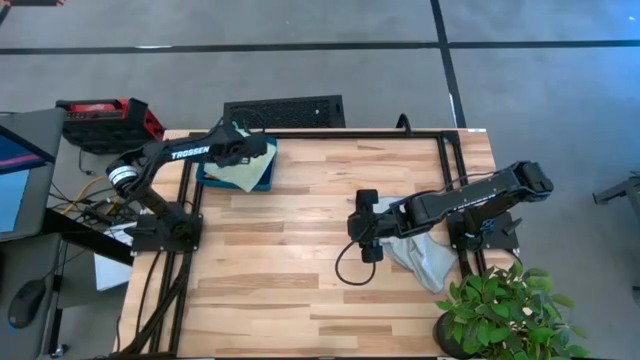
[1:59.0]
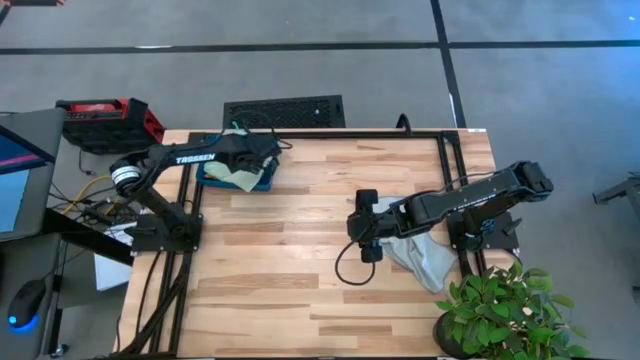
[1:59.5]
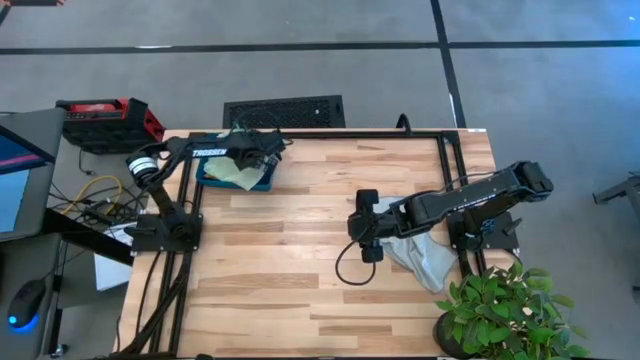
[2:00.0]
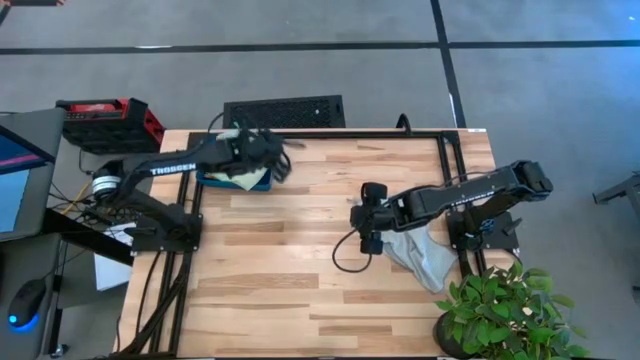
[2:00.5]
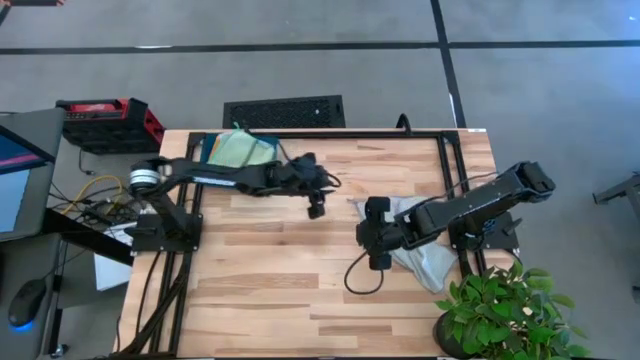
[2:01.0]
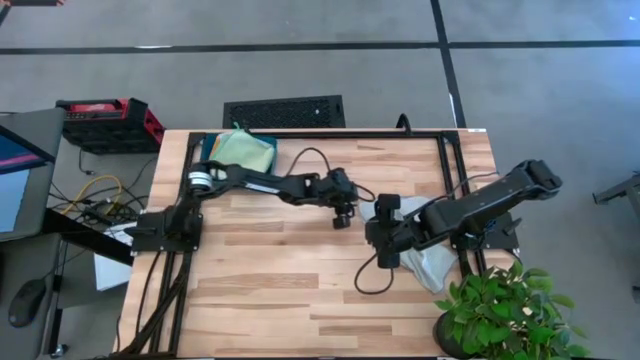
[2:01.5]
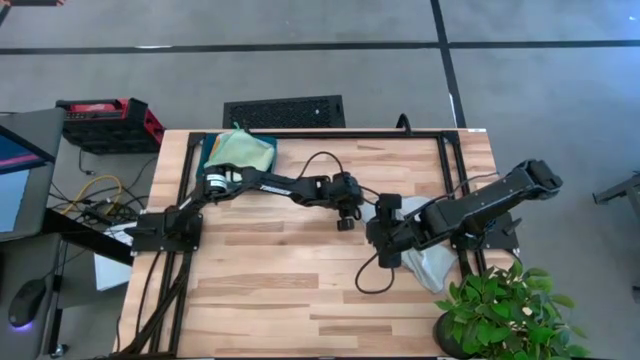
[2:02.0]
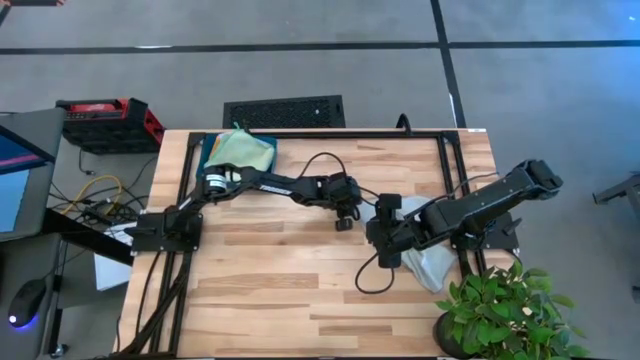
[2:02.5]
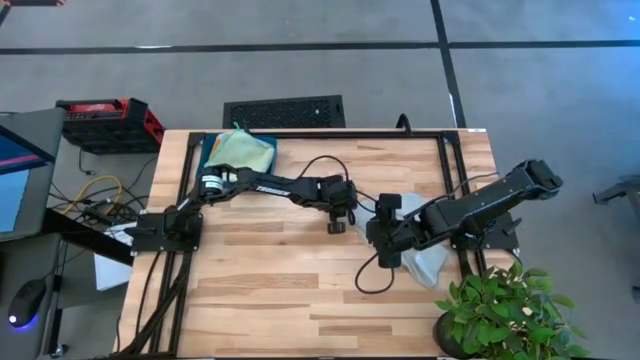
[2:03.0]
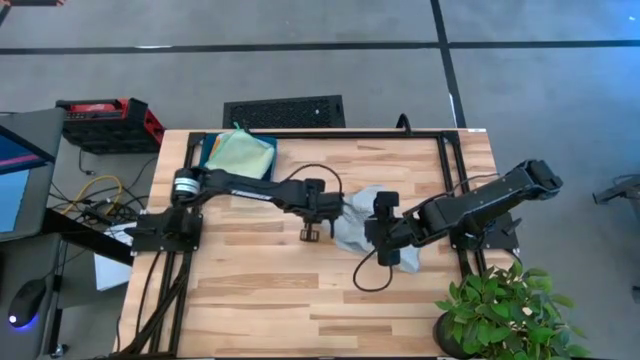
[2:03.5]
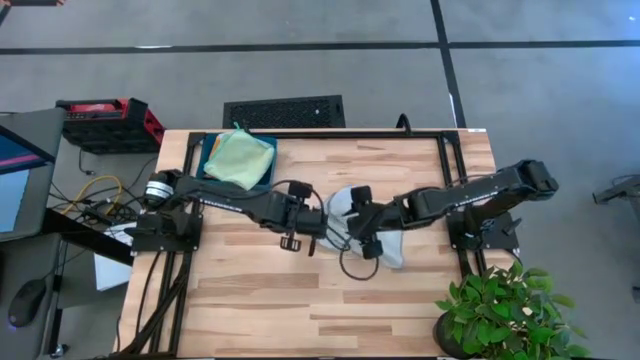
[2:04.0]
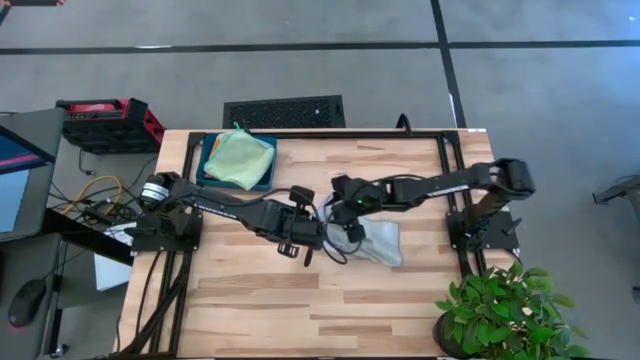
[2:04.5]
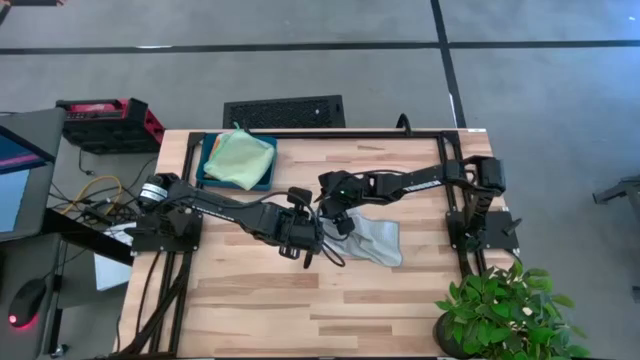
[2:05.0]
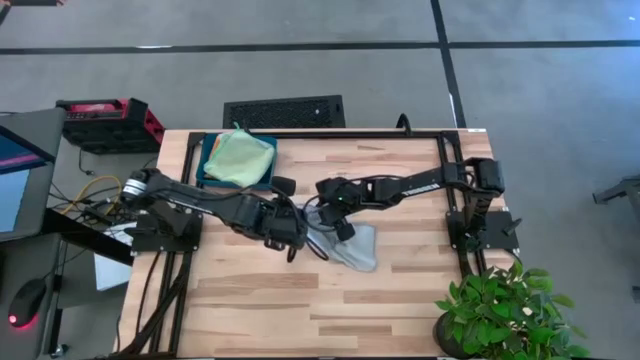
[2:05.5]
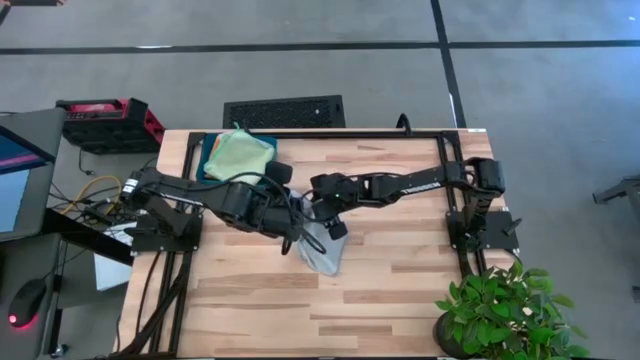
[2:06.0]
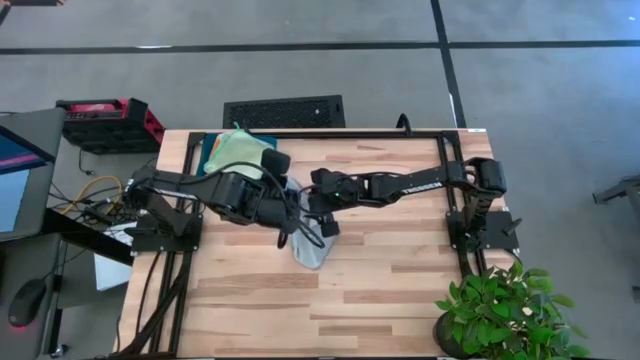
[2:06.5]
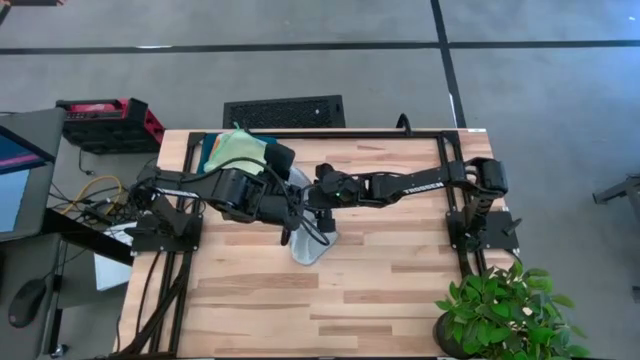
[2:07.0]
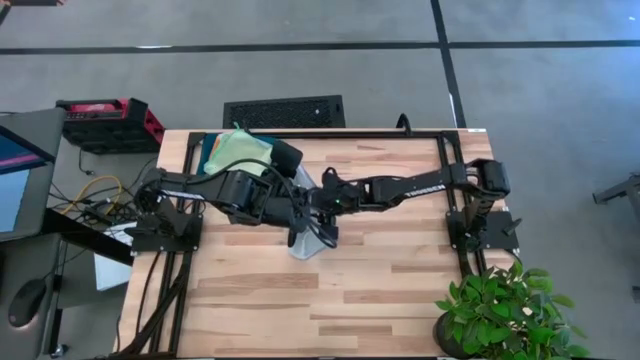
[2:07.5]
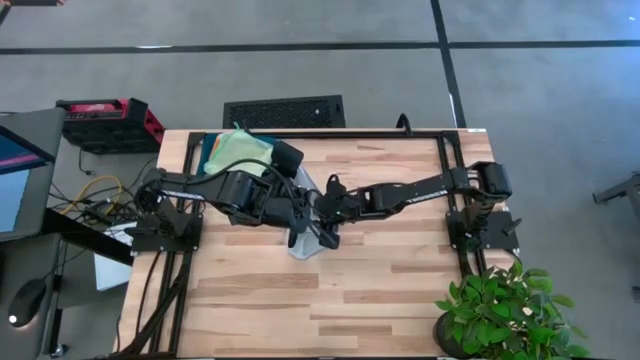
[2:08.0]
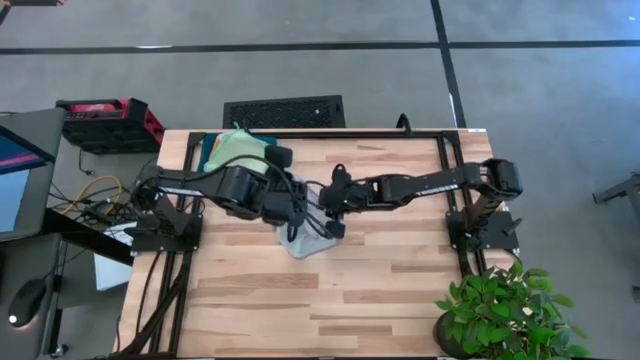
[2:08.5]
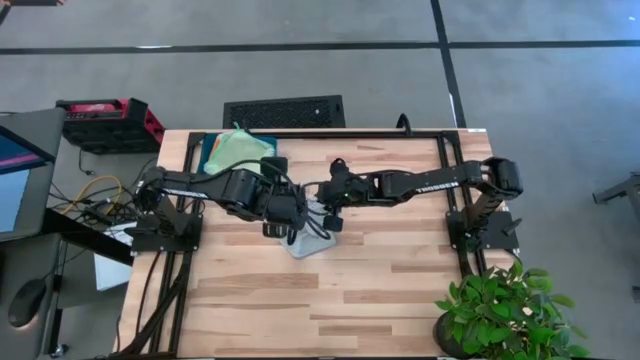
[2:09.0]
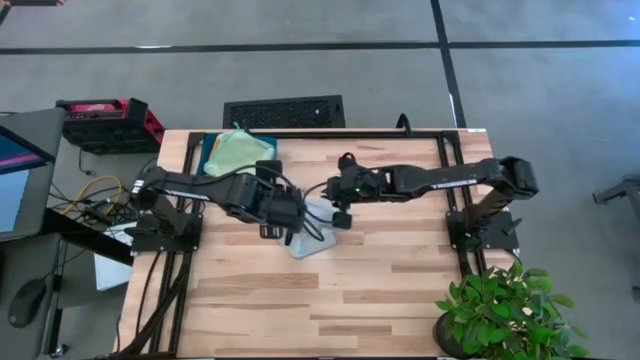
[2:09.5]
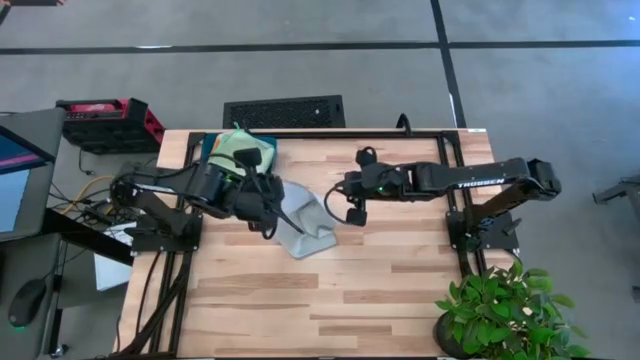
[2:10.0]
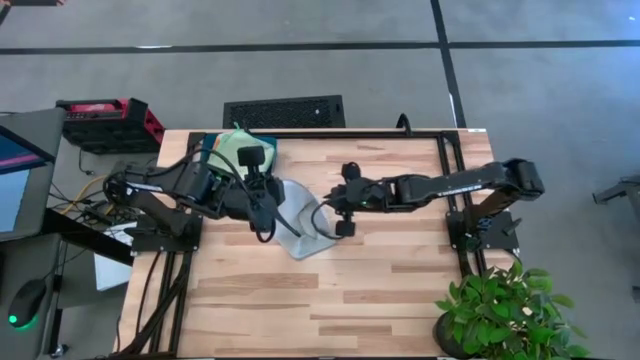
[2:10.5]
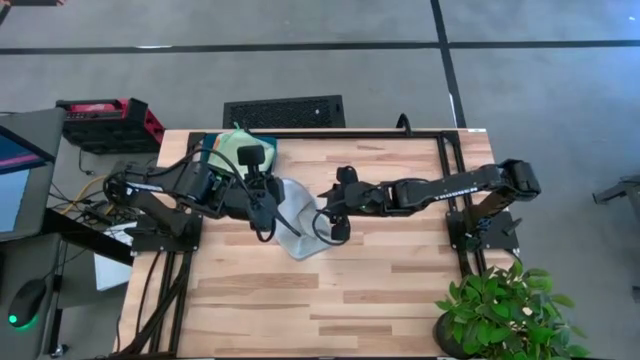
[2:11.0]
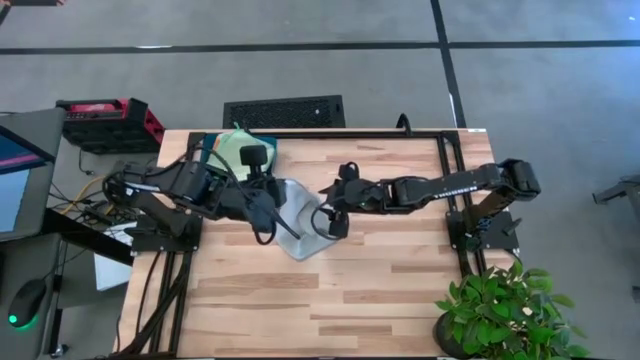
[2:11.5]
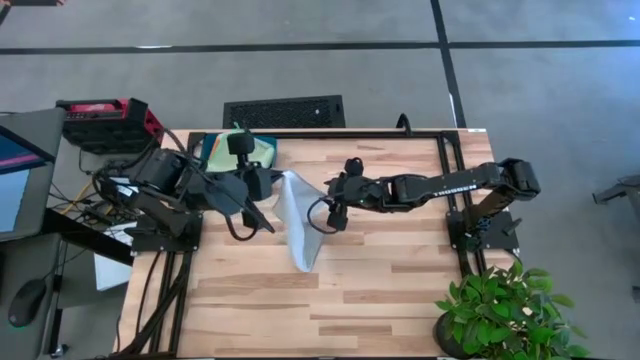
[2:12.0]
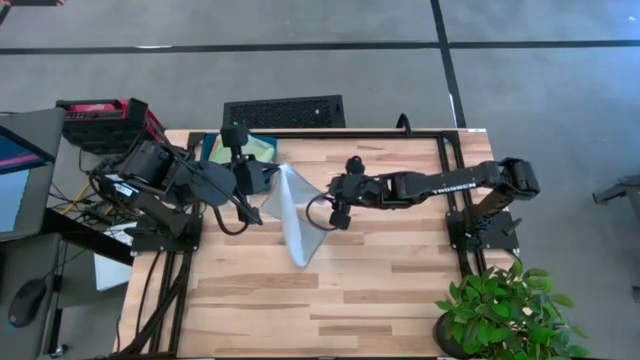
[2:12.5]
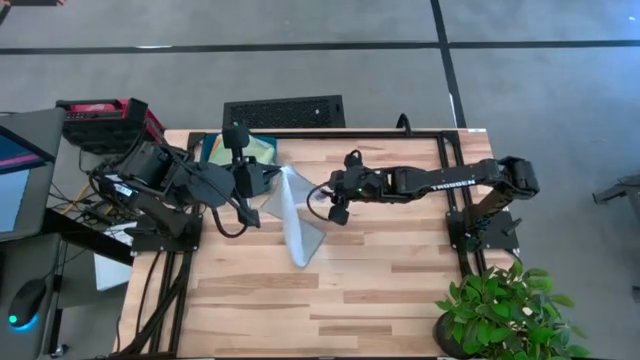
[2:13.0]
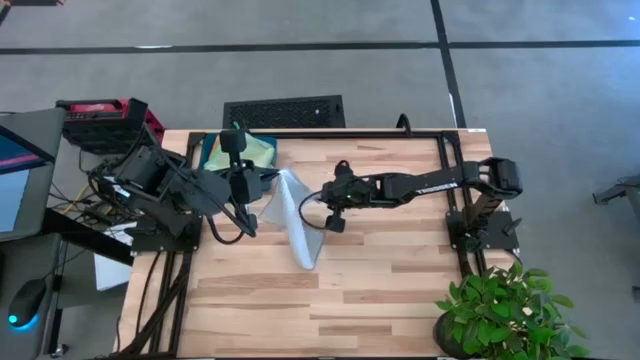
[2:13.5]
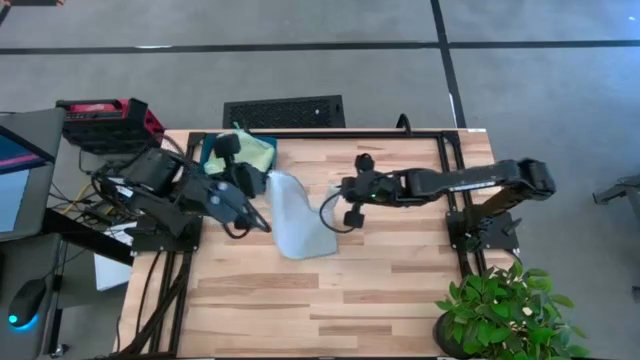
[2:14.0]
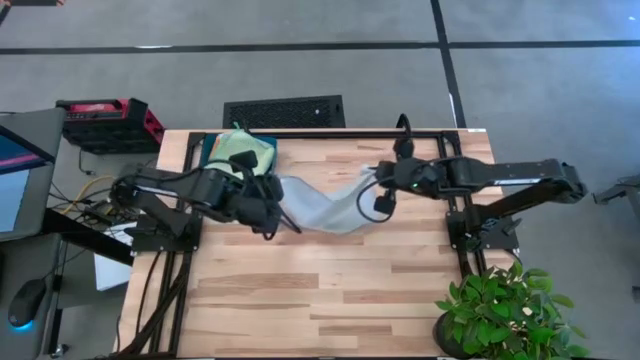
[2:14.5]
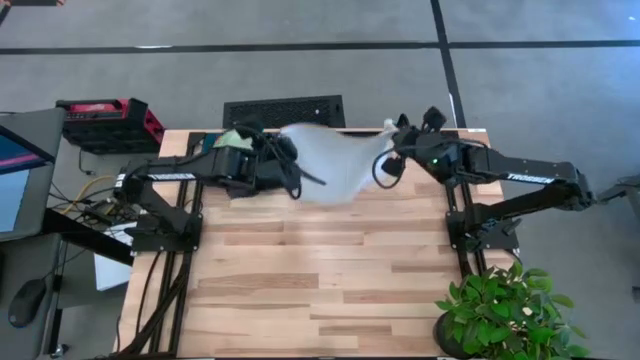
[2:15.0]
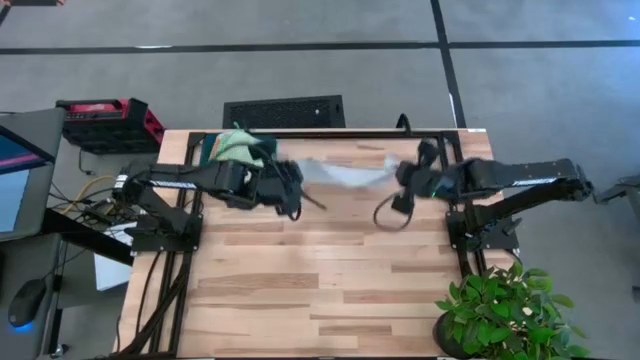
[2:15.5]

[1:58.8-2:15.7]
Task: Fold microfiber towels
Fold the gray towel

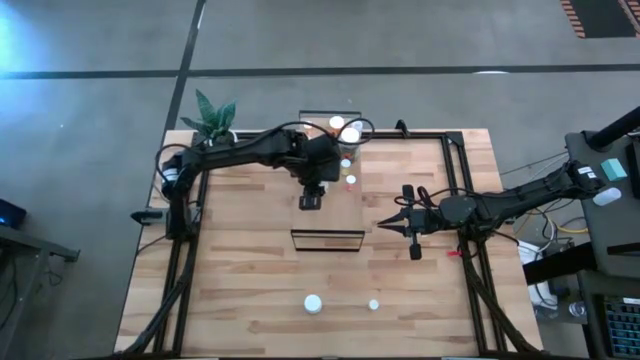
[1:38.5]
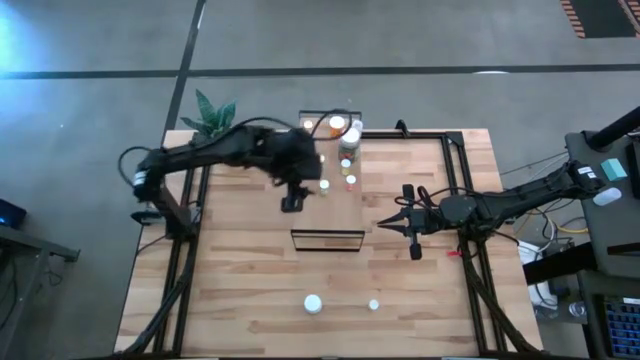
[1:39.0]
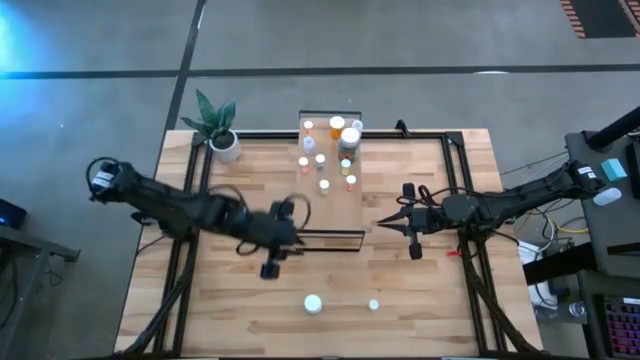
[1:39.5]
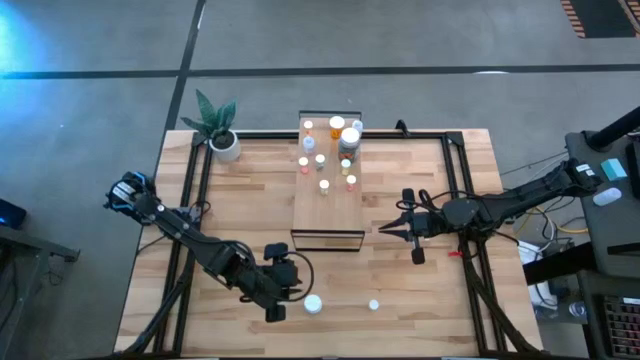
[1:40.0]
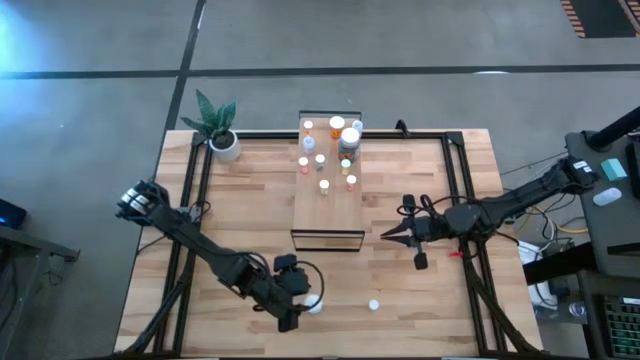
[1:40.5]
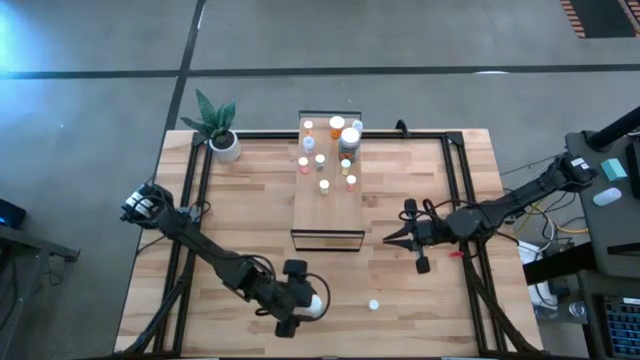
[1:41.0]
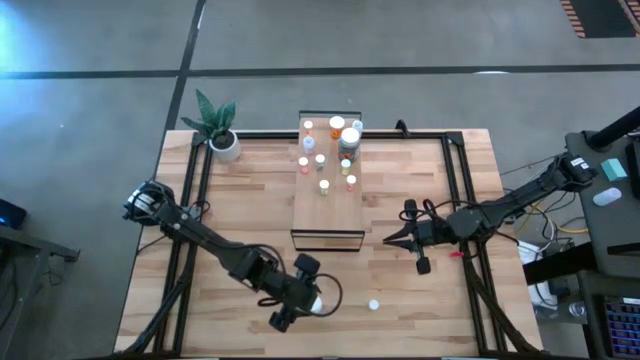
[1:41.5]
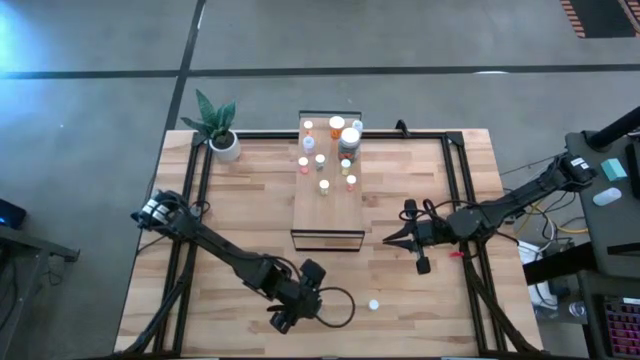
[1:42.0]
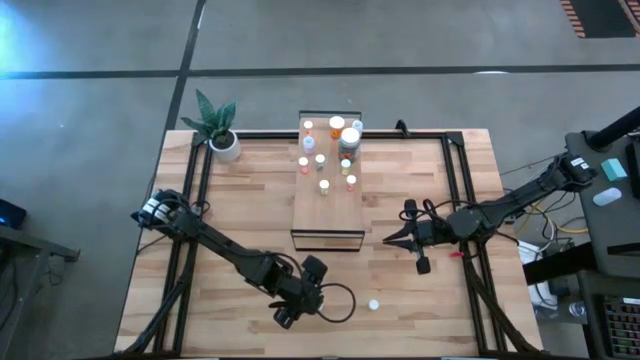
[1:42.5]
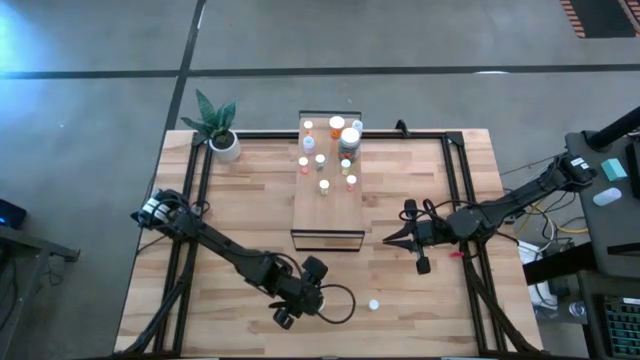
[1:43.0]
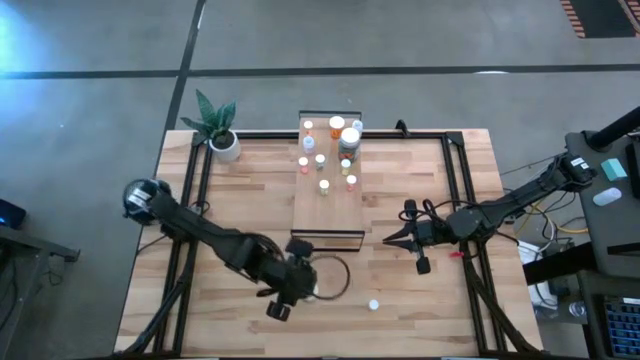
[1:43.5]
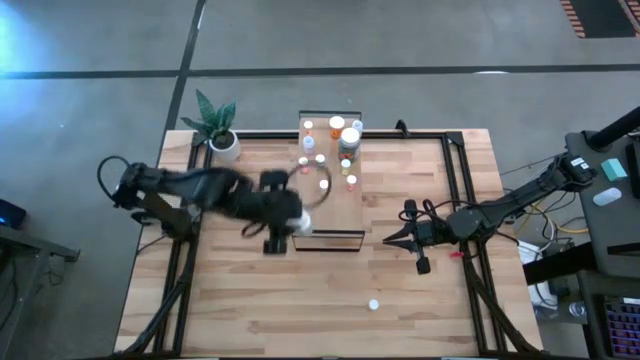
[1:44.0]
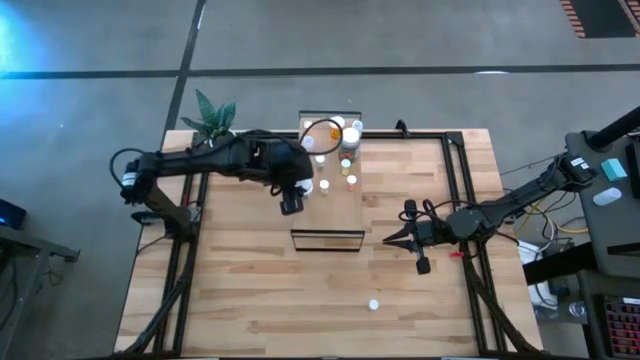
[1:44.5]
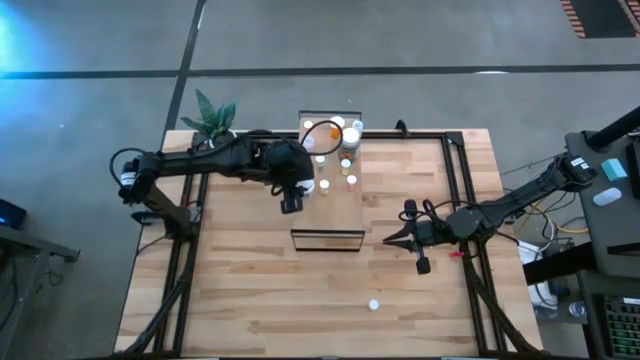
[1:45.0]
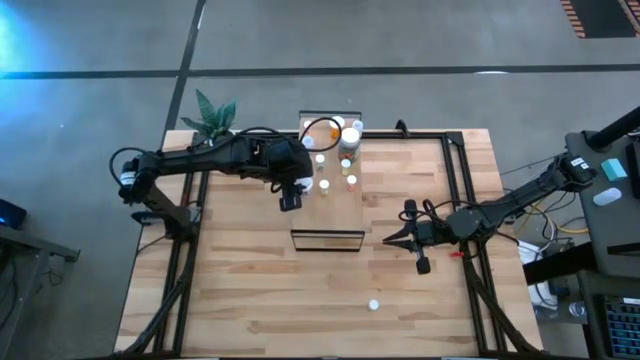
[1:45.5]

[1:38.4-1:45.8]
Task: Pick and place medicine bottles onto shelf by color
Put the white medicine bottle on the shelf
